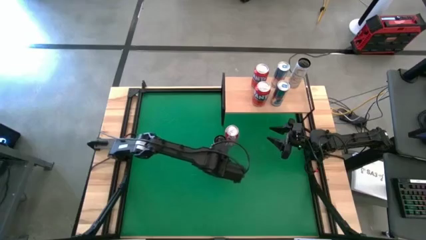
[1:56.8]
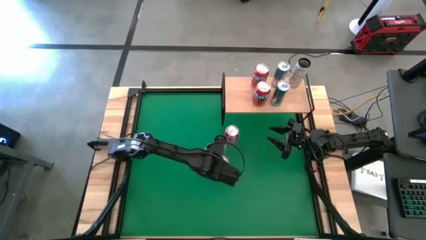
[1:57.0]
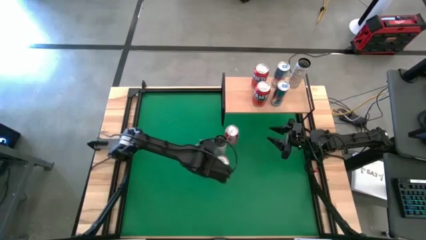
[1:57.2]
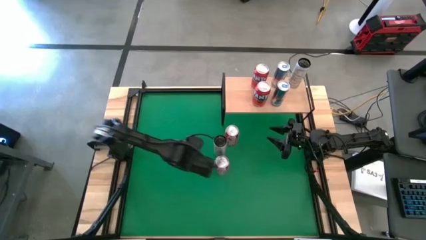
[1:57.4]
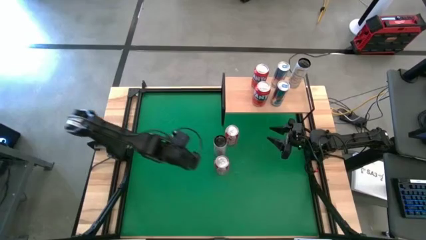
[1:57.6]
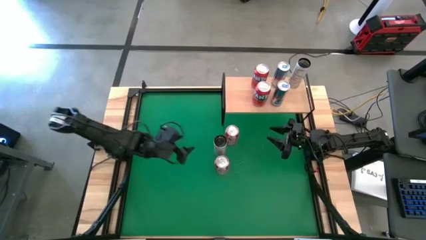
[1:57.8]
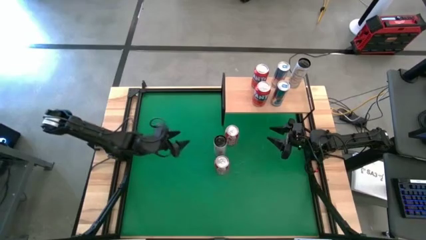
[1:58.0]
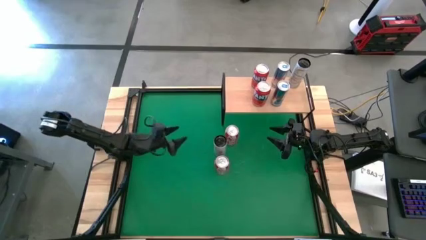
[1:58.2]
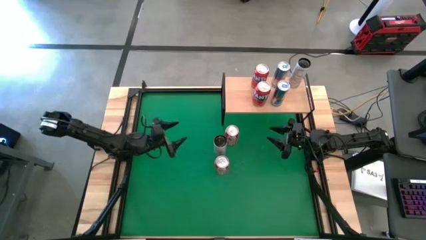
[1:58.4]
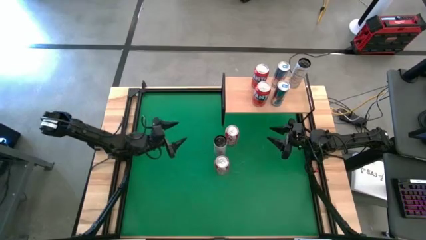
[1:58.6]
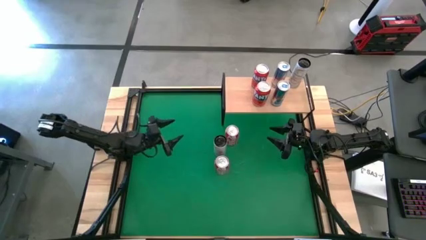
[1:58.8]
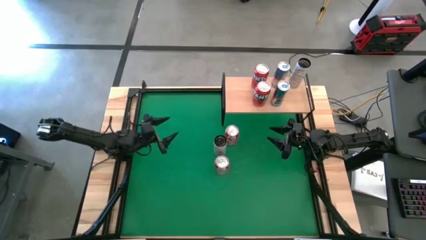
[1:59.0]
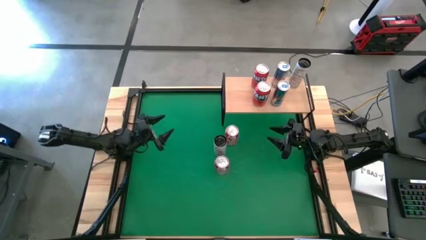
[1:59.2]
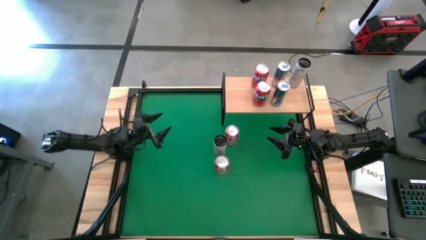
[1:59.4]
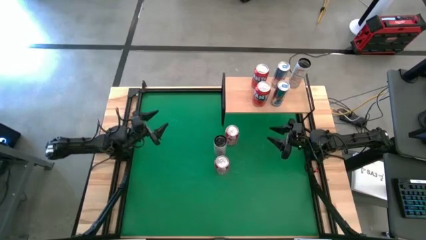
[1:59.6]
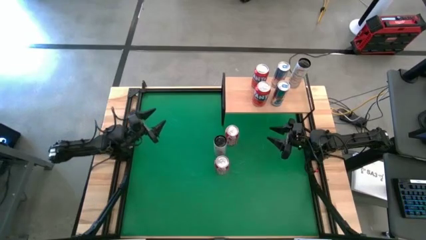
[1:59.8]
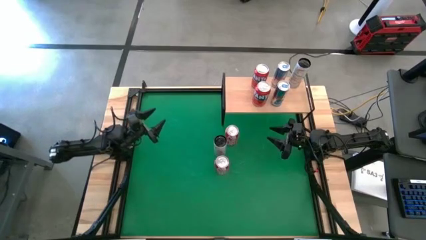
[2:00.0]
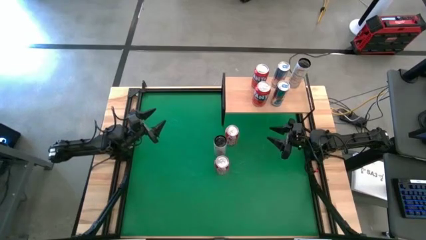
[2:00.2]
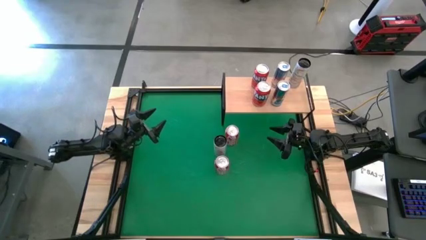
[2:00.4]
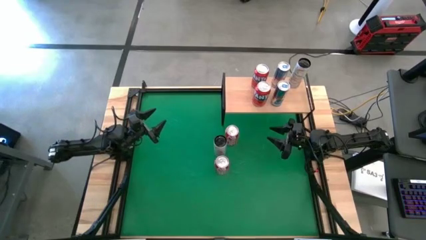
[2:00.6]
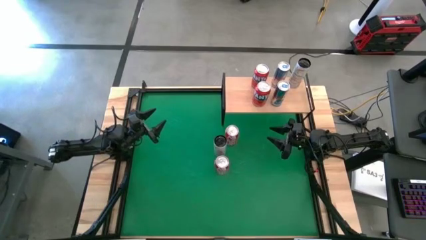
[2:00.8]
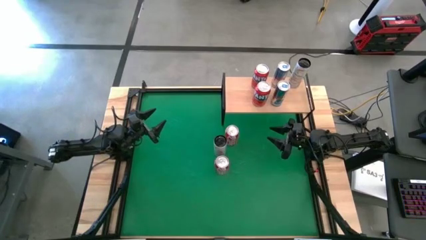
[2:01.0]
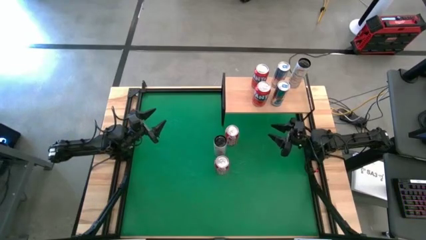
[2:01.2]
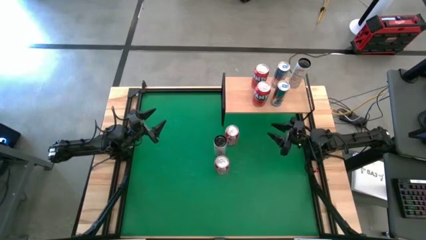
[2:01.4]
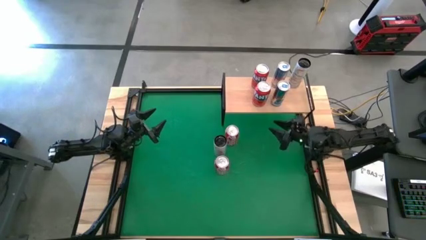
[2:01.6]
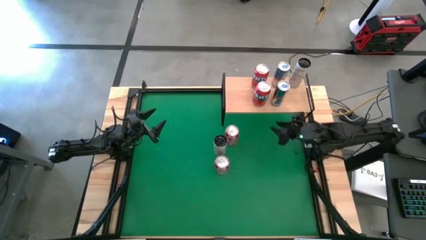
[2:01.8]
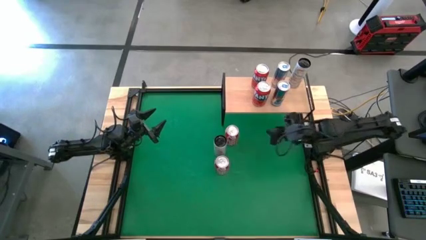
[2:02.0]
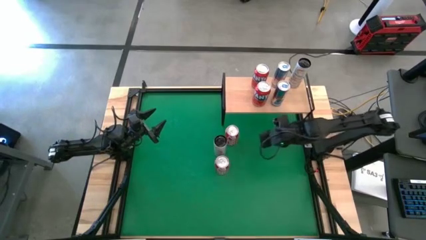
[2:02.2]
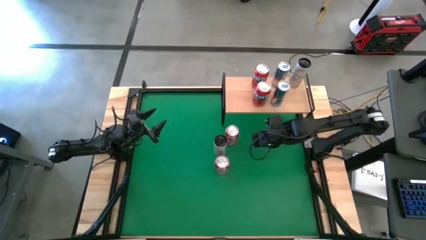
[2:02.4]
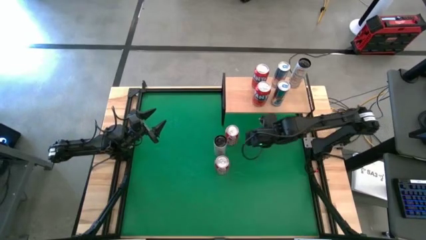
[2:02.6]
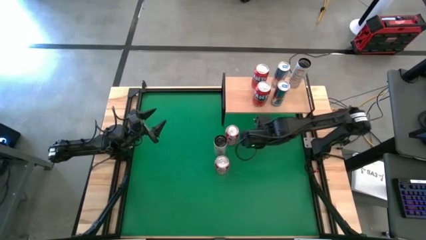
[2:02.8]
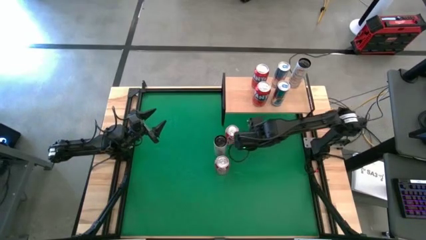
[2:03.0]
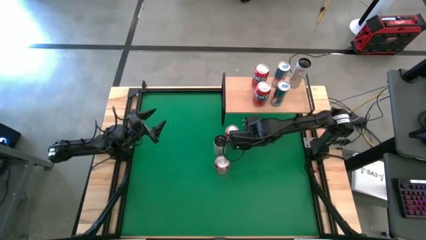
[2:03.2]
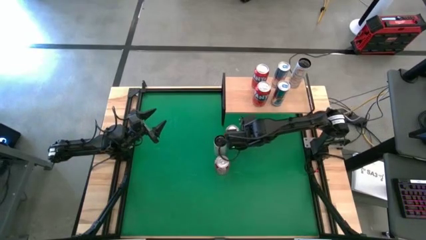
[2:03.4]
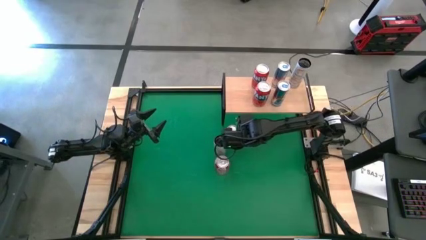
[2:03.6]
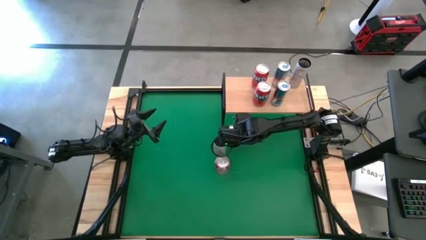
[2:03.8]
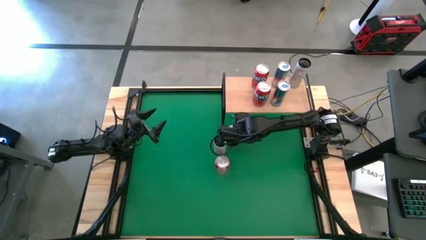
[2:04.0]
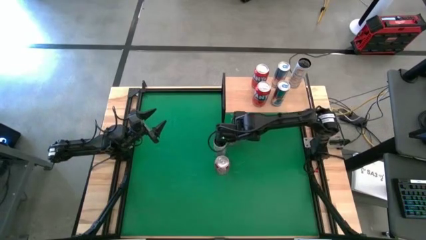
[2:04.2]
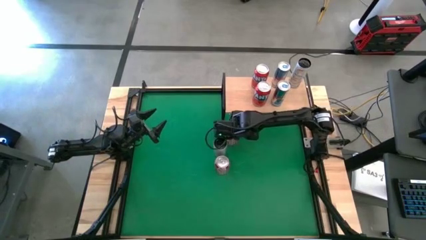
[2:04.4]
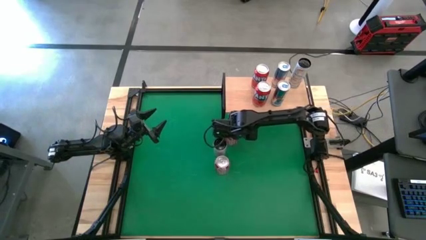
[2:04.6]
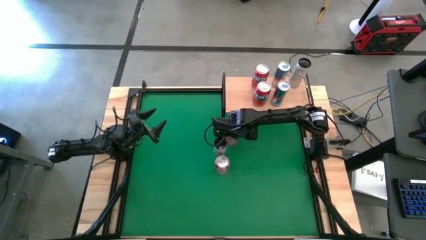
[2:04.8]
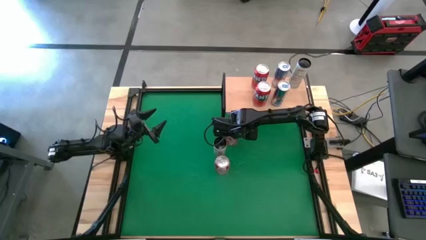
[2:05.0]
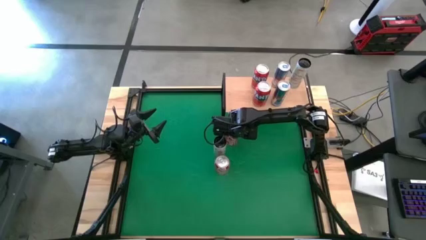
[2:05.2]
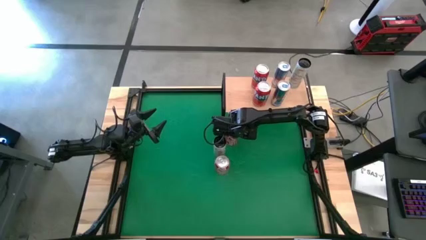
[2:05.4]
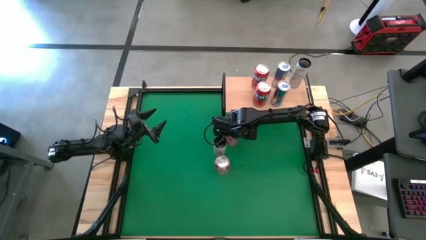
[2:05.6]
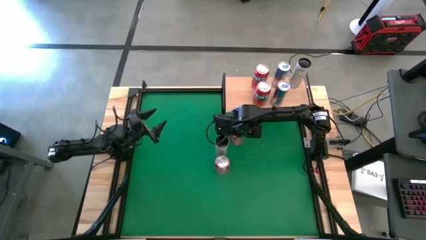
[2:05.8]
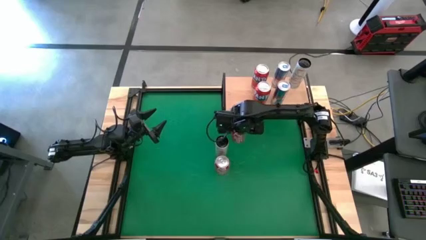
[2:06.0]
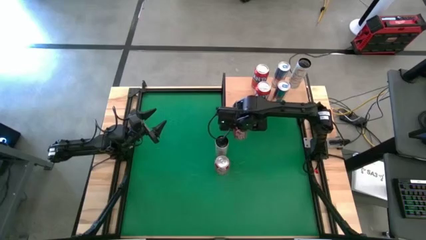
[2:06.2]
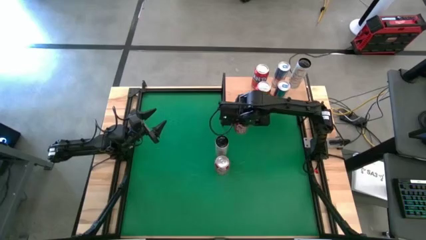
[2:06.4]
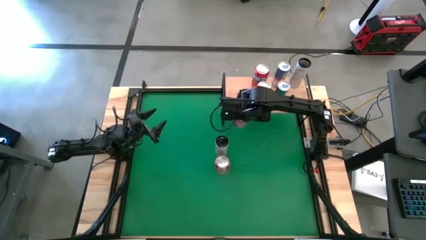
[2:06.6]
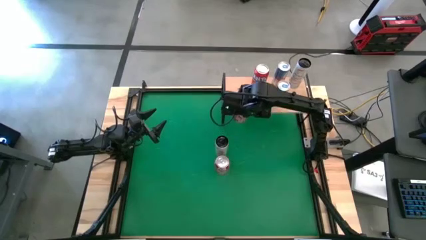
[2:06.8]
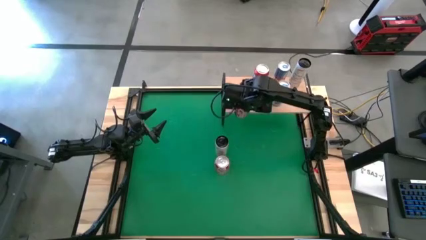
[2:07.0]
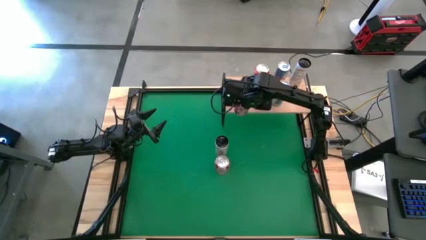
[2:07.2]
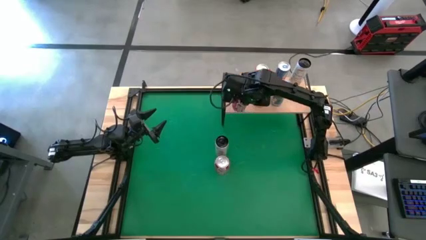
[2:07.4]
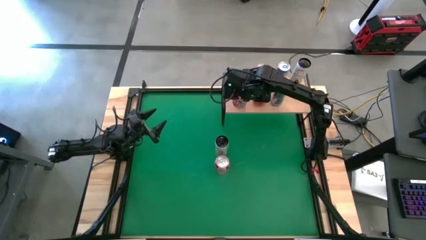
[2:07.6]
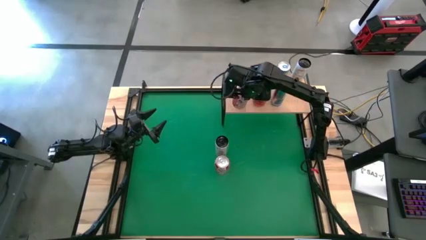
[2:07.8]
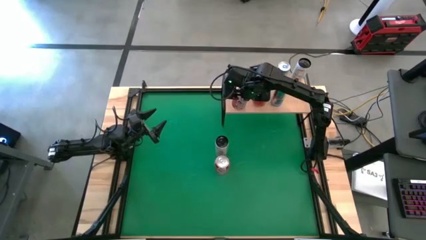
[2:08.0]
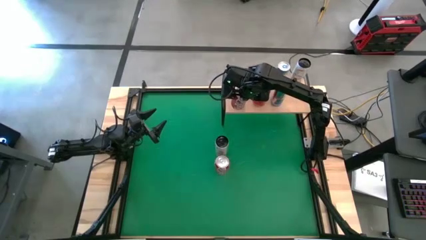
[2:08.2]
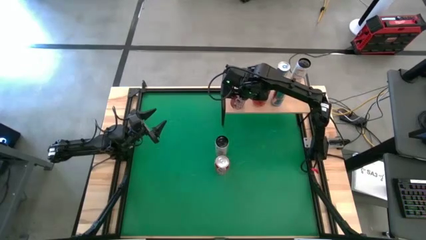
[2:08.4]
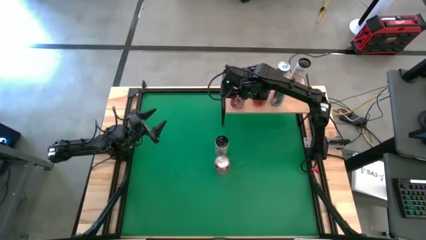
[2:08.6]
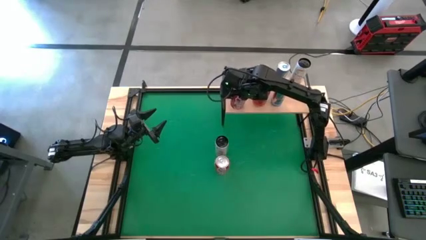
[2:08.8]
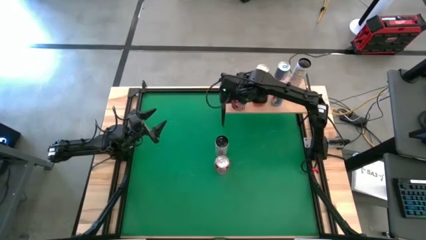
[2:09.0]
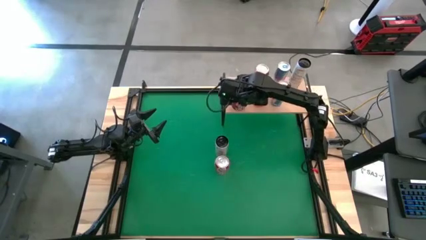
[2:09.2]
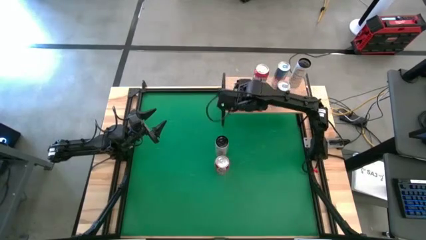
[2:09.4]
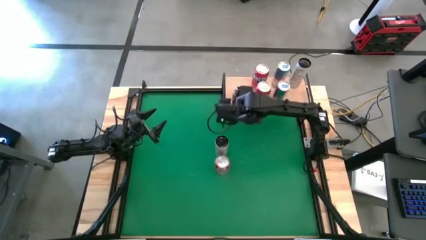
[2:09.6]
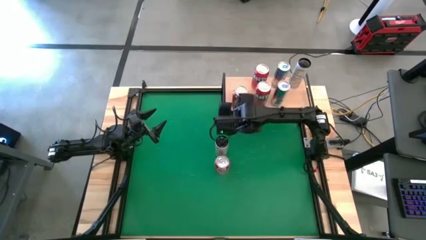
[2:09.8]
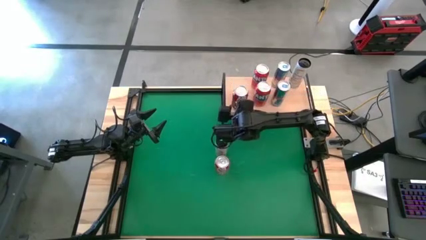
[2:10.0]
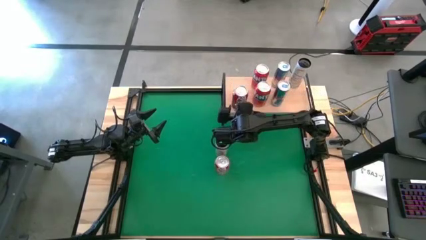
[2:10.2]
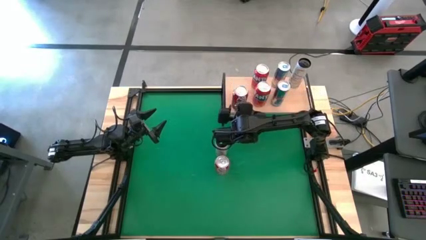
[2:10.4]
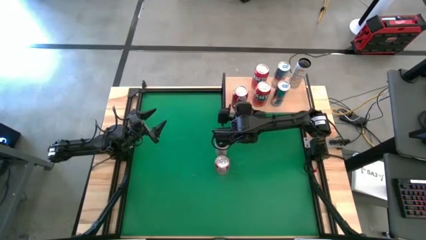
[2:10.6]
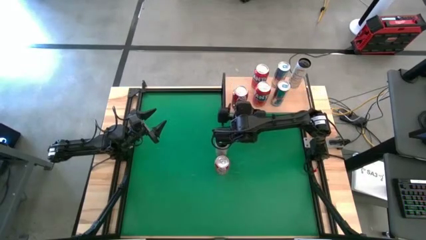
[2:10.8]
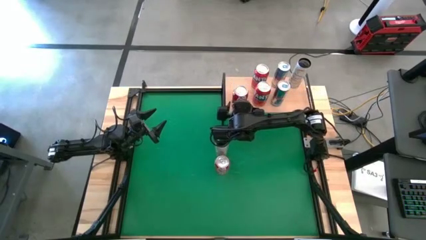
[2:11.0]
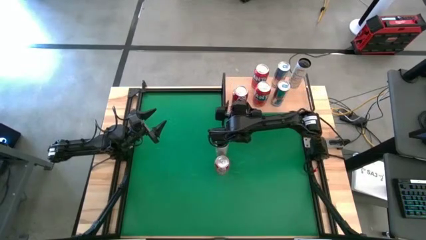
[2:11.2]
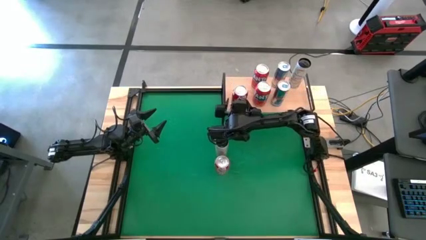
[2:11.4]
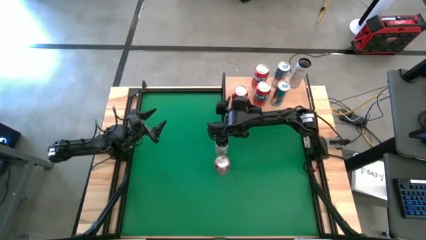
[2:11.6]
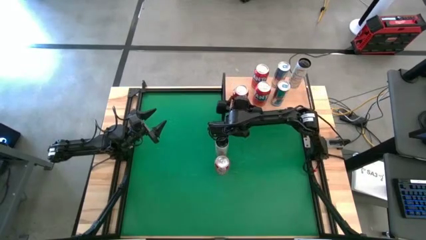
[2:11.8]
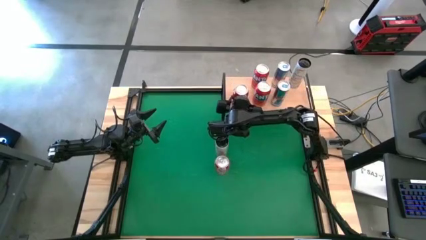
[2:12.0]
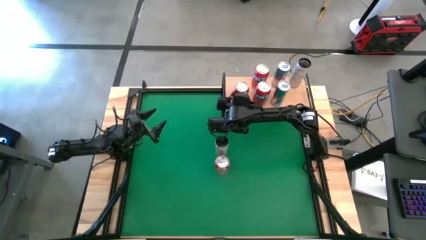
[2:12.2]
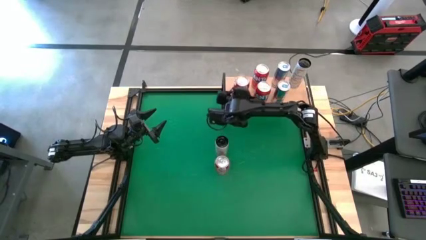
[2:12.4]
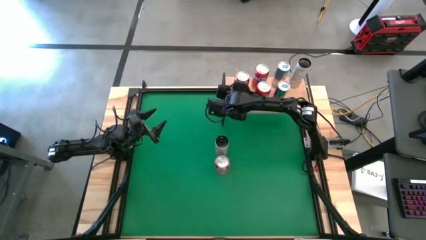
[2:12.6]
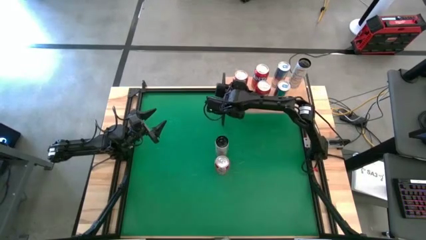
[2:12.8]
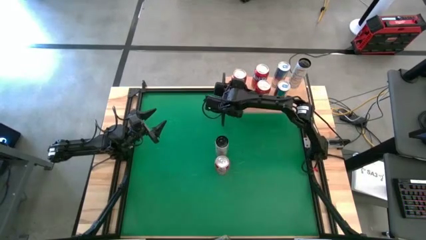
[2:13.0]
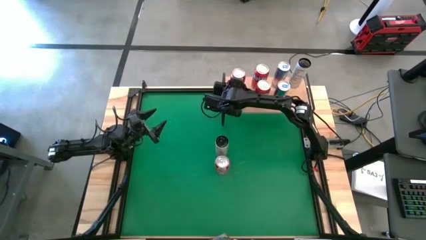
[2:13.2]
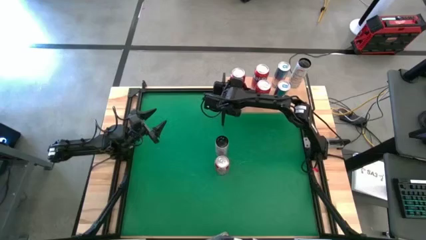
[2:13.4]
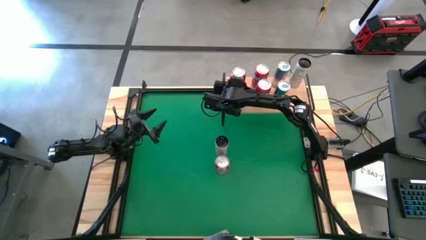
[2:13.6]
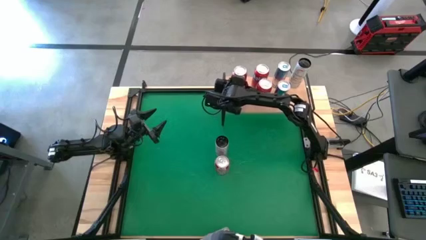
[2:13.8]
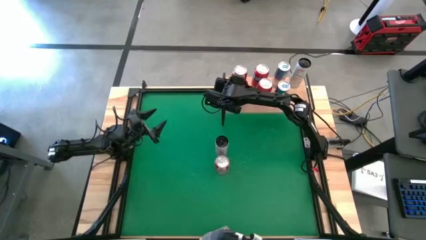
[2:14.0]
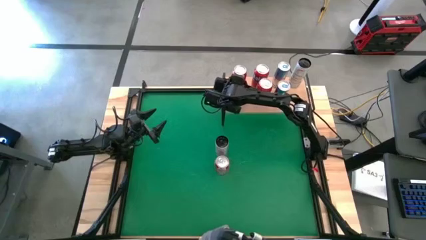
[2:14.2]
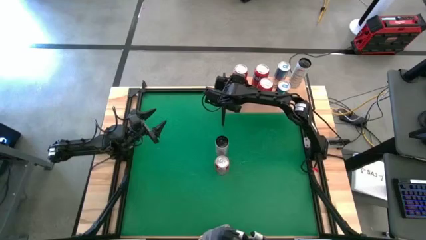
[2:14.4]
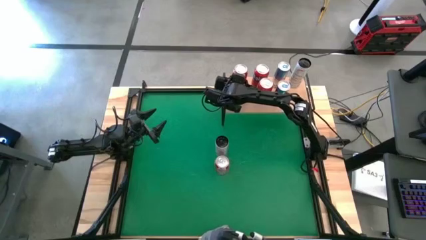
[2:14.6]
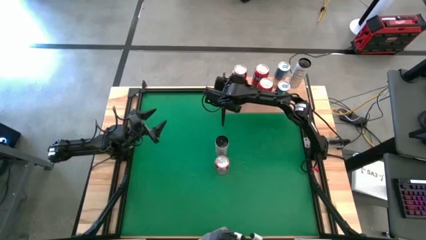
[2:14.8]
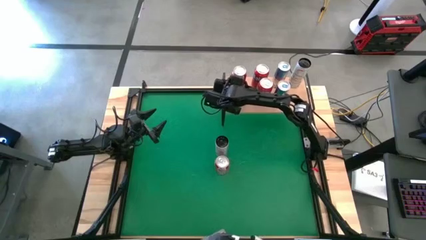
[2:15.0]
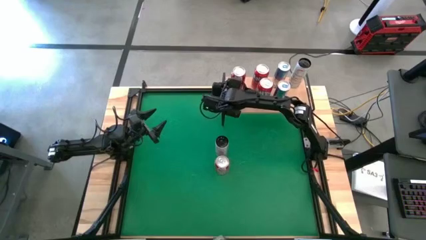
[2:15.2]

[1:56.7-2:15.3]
Task: Place canned beverage on shelf
Put the top red white soda can on the shelf
